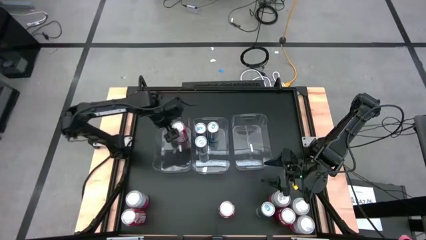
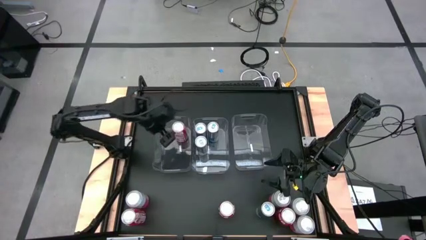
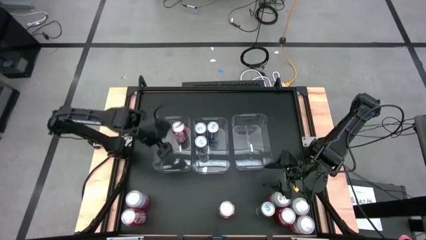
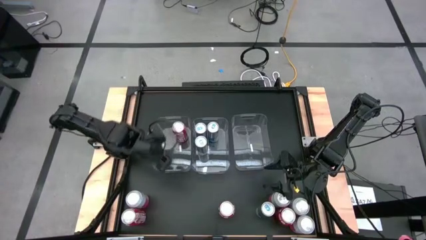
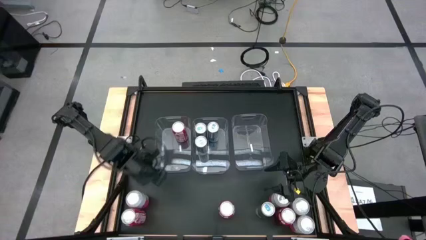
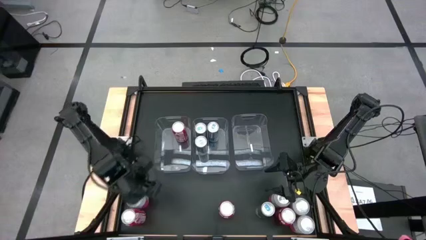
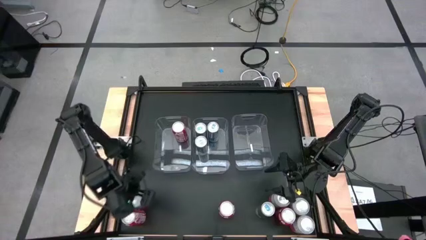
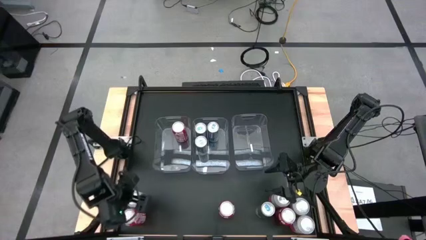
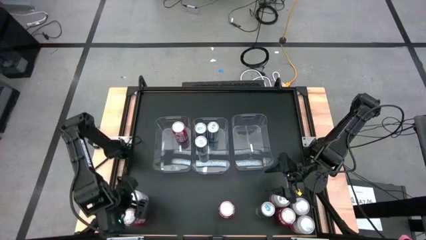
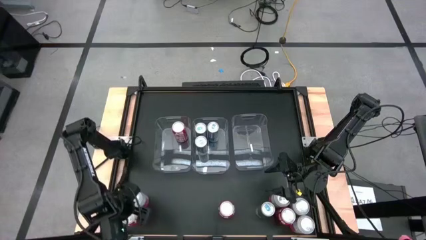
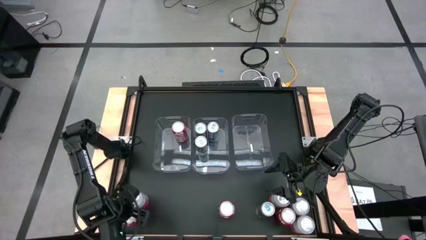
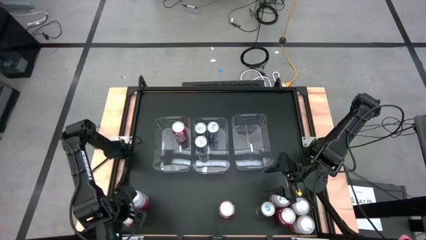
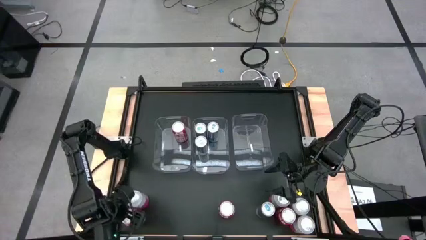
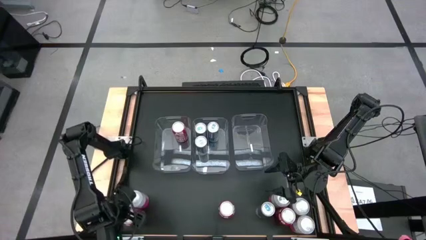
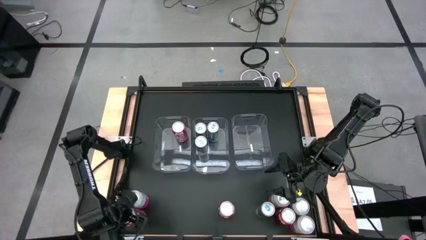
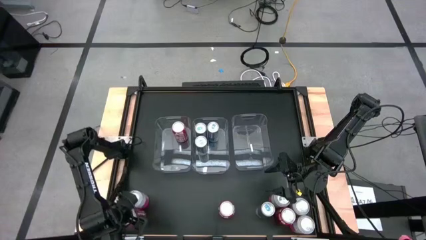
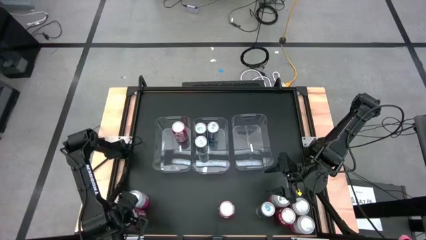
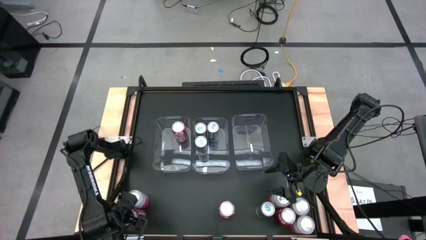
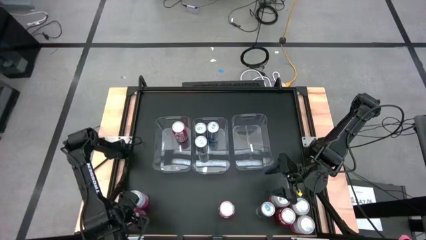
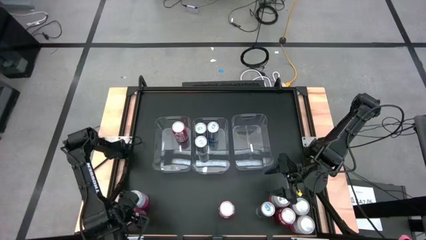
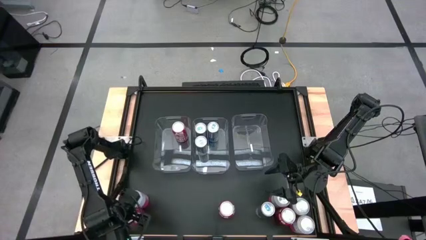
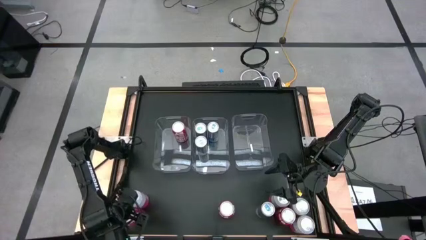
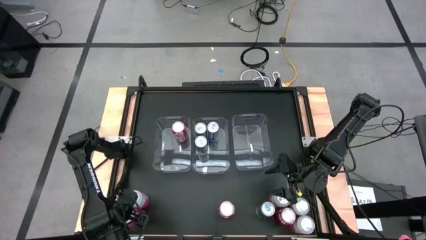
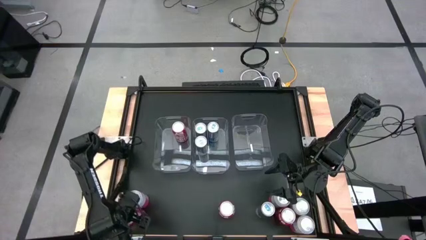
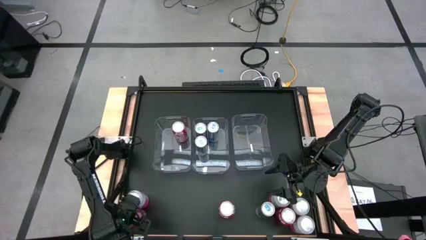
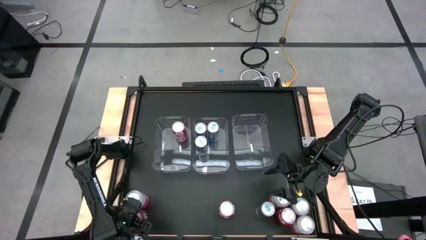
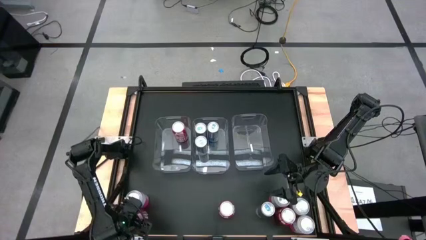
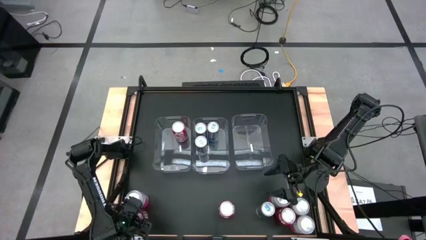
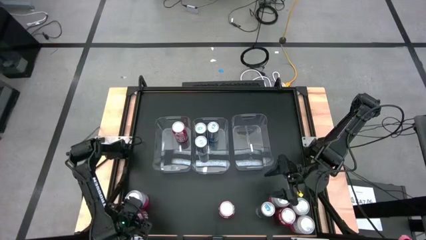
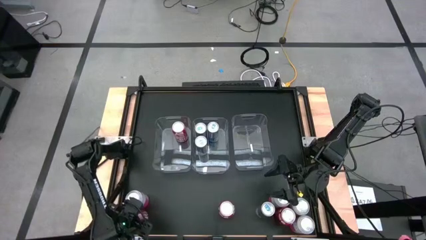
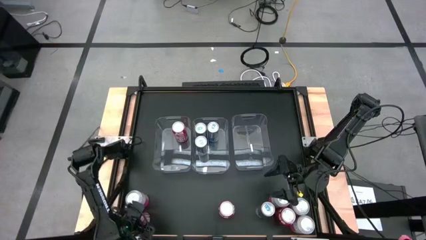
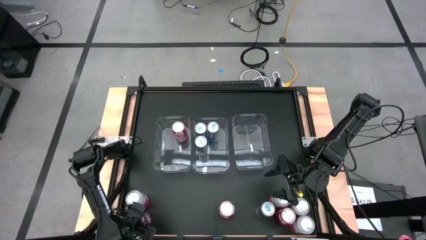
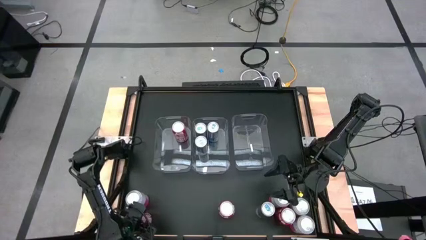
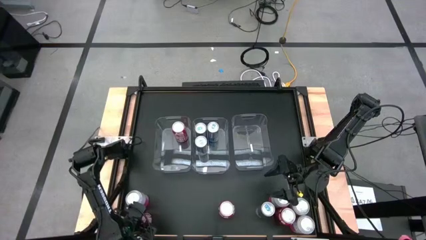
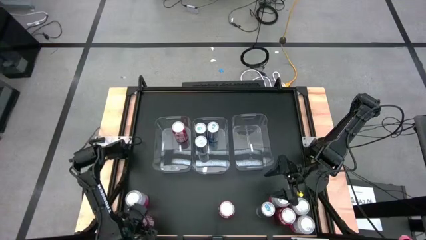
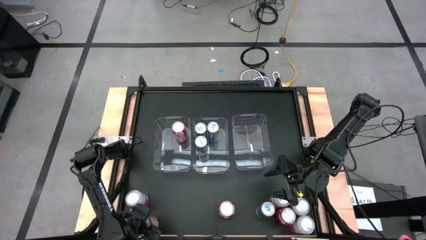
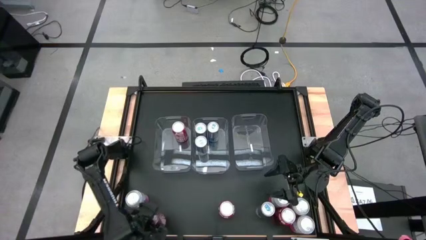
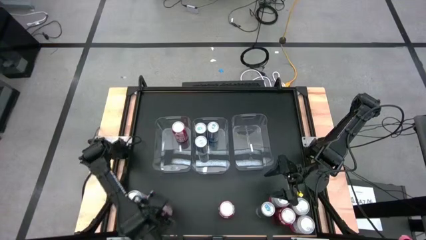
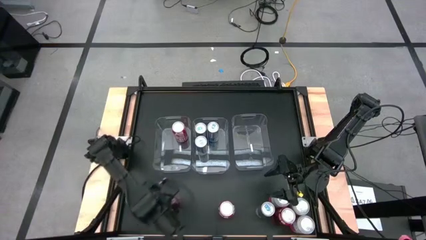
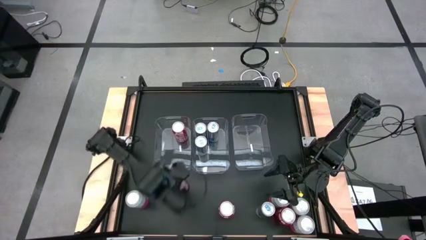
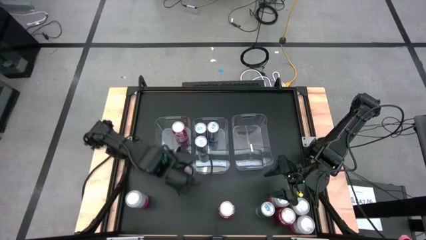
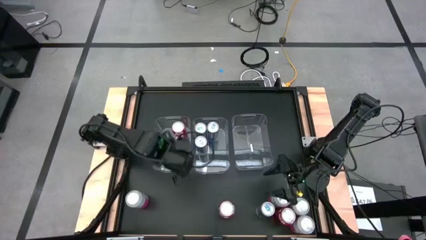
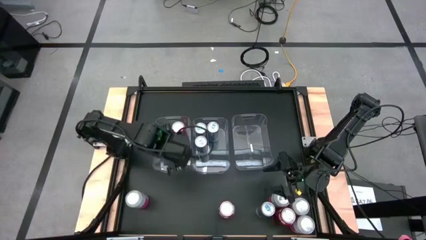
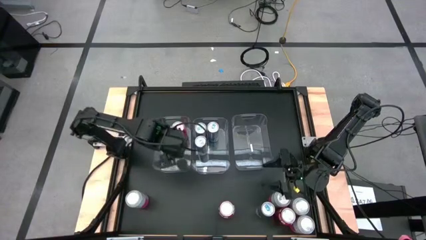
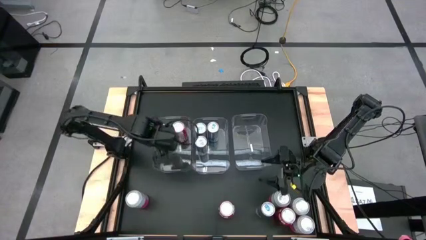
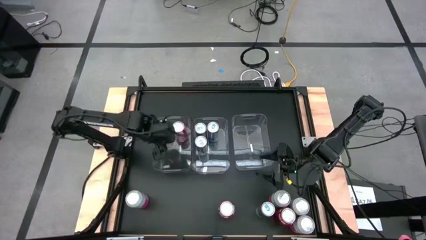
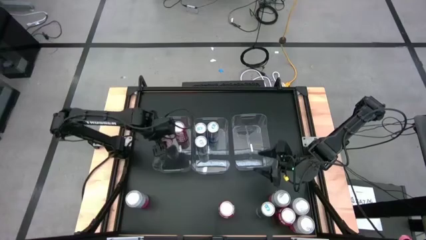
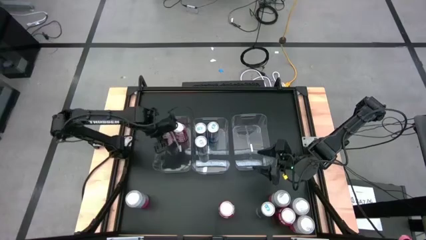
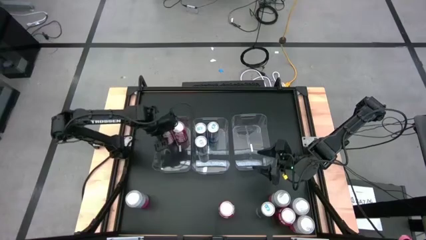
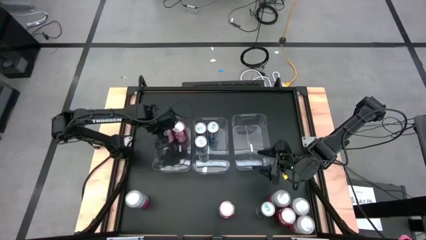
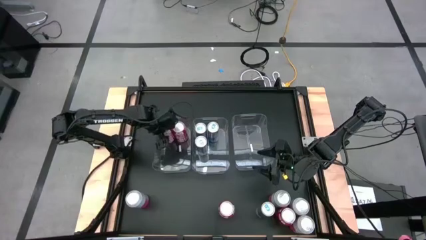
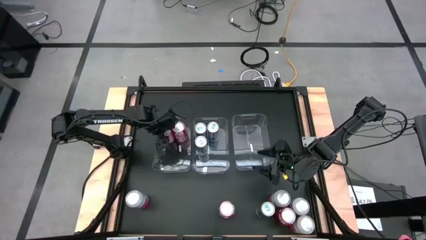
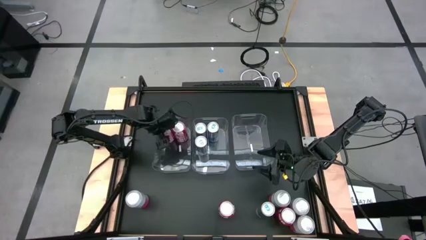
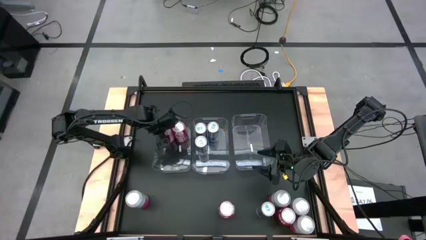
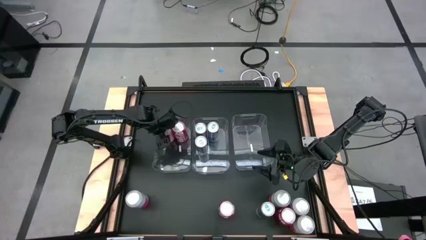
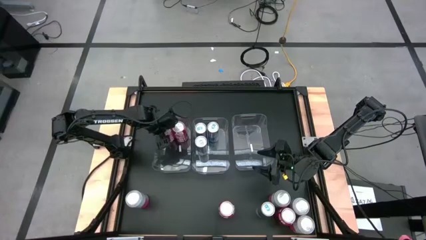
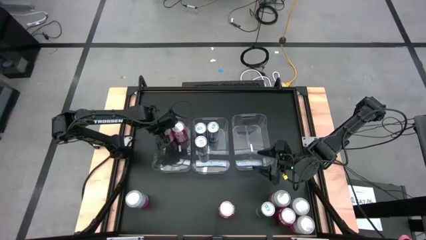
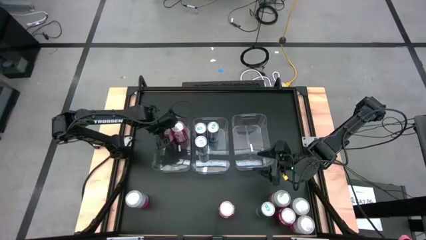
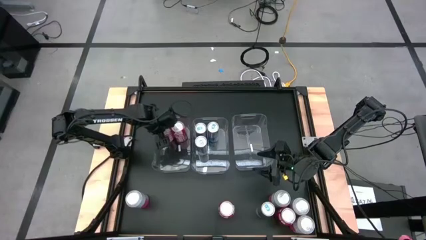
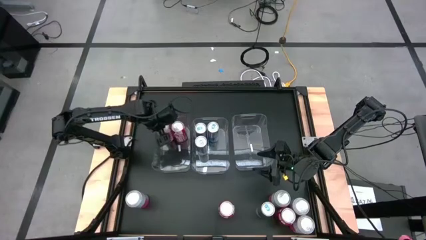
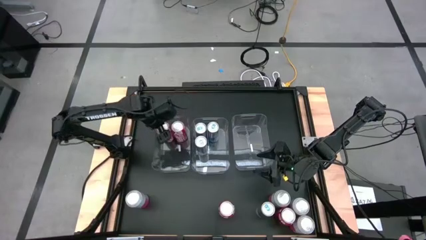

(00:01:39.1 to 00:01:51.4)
Task: Sort soda cans
Put the red soda can into the left transparent bin

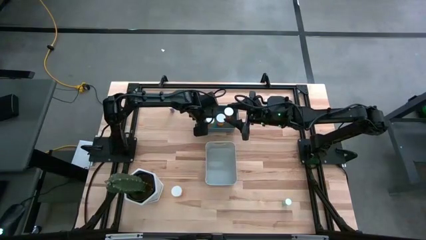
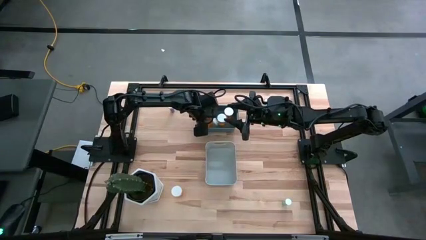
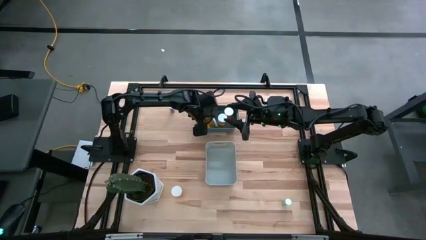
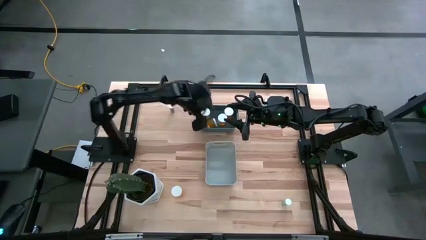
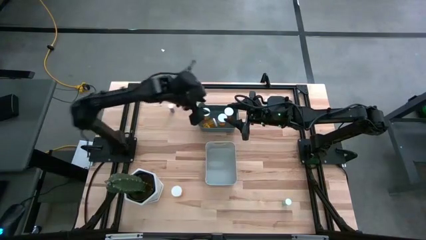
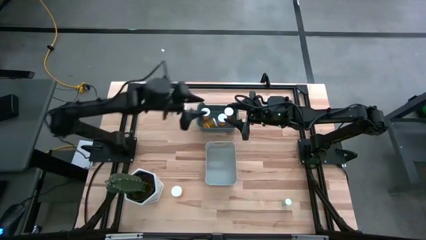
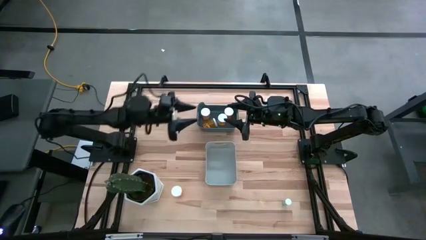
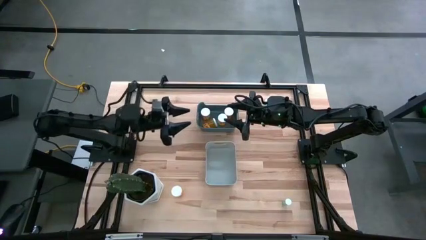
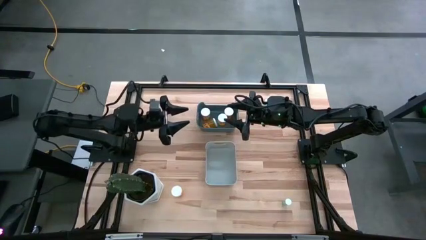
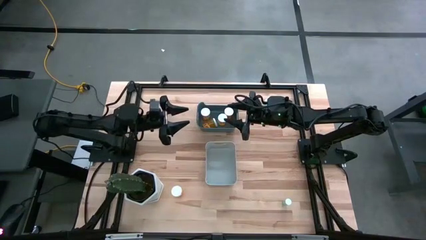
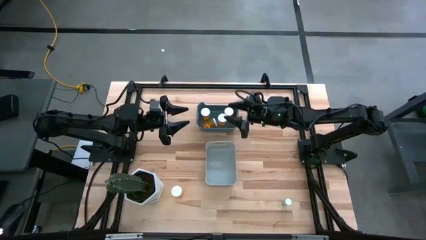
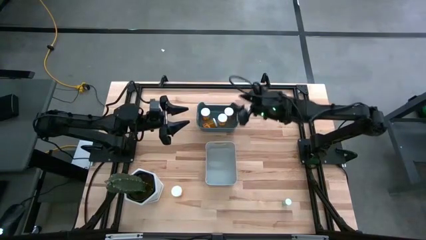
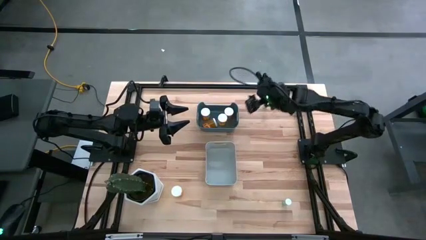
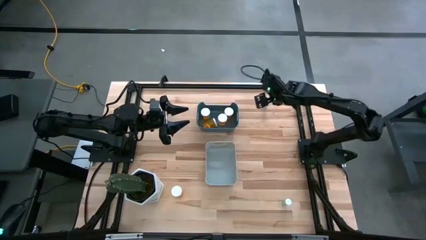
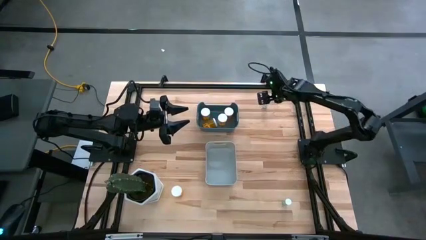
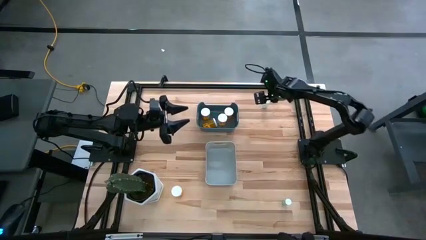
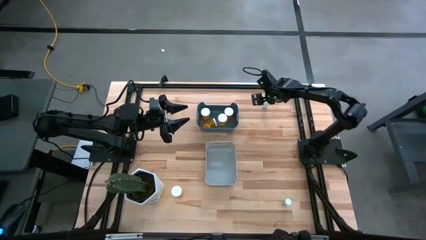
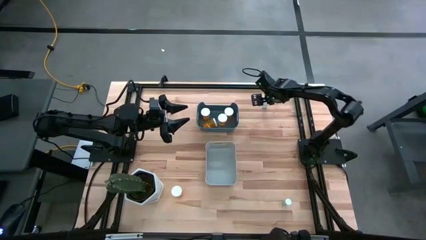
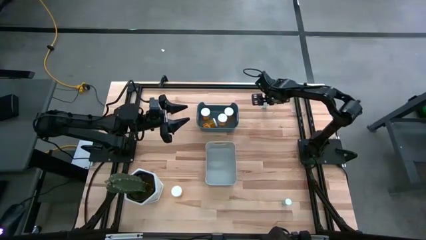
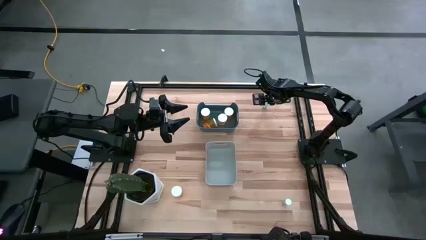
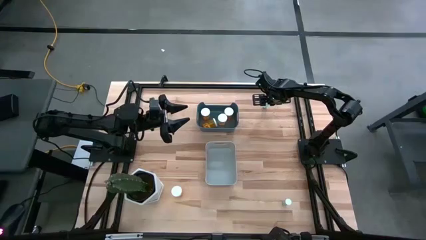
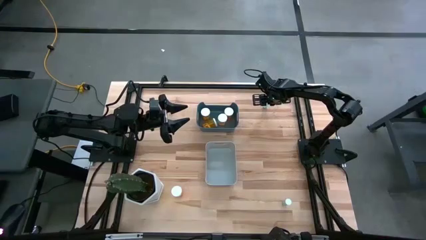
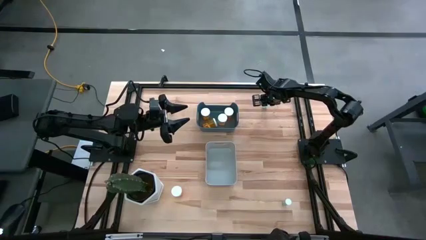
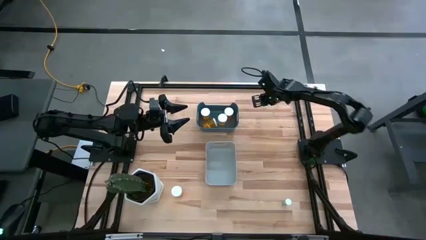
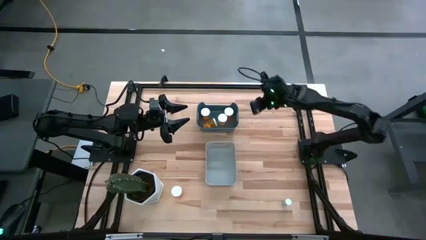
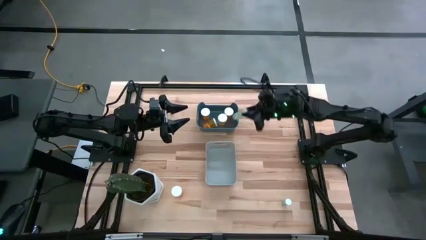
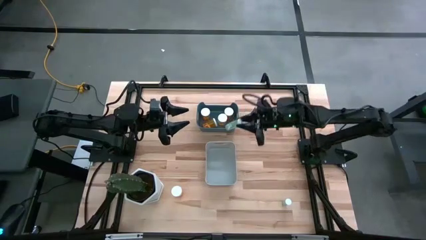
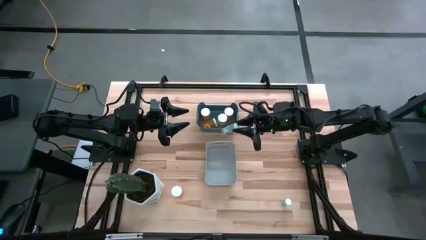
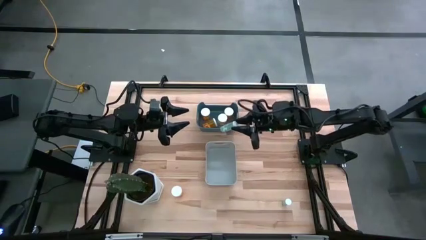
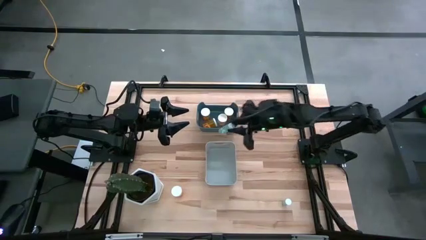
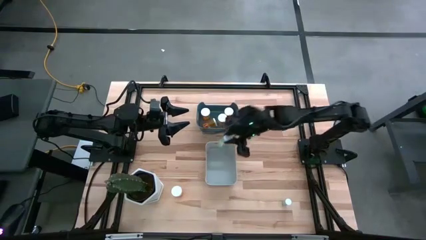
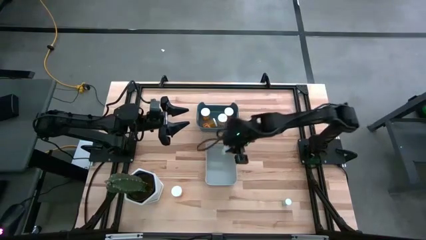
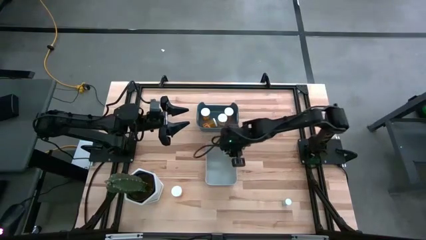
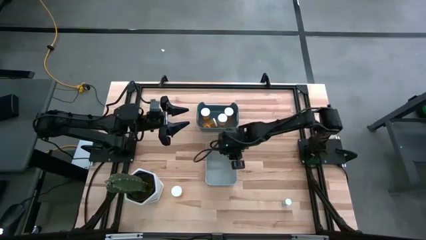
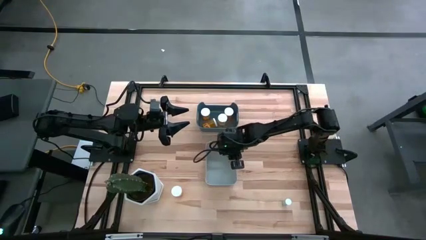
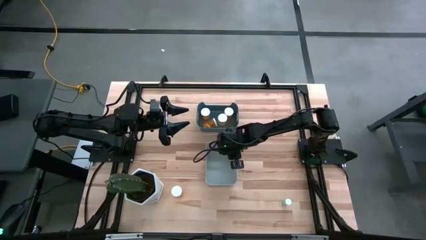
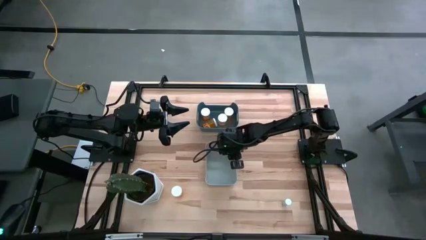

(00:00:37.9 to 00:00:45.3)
Task: Pick and place medicine bottles into bin by pill shape (circle, oval)
Put the blue tablet bottle into the gray bin
